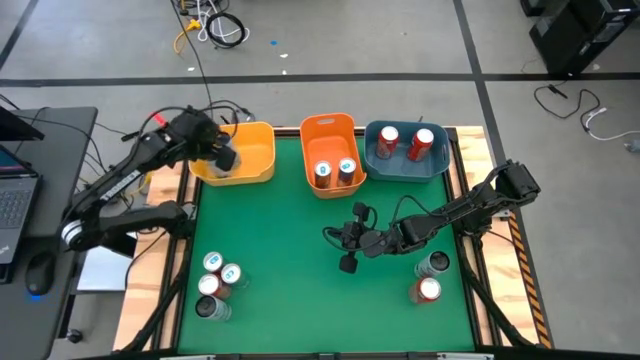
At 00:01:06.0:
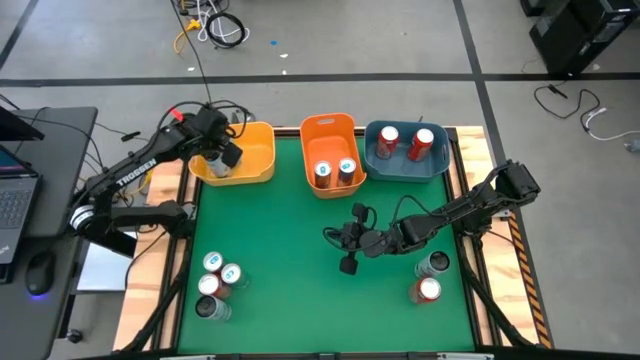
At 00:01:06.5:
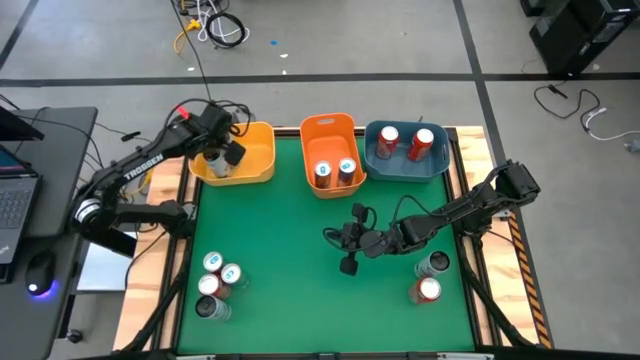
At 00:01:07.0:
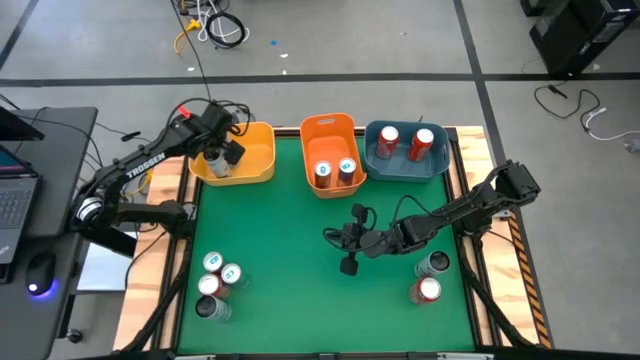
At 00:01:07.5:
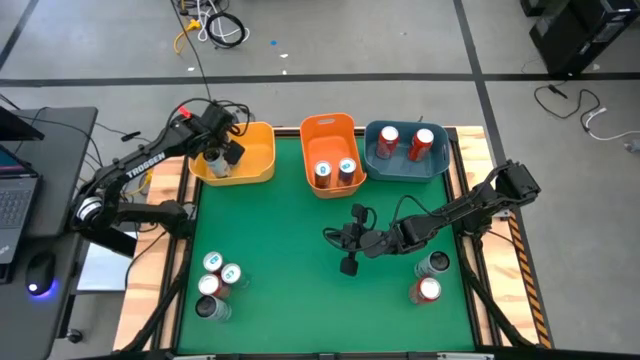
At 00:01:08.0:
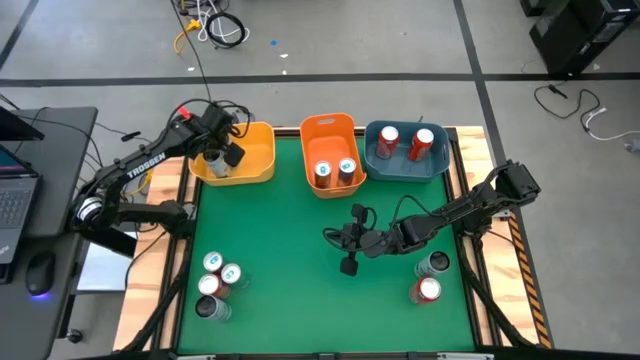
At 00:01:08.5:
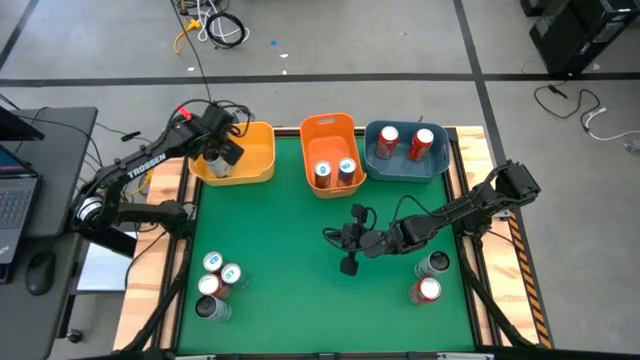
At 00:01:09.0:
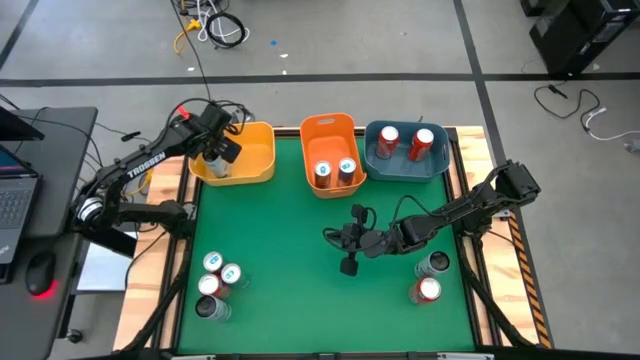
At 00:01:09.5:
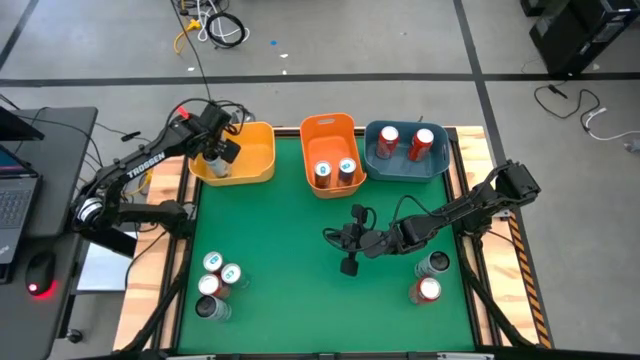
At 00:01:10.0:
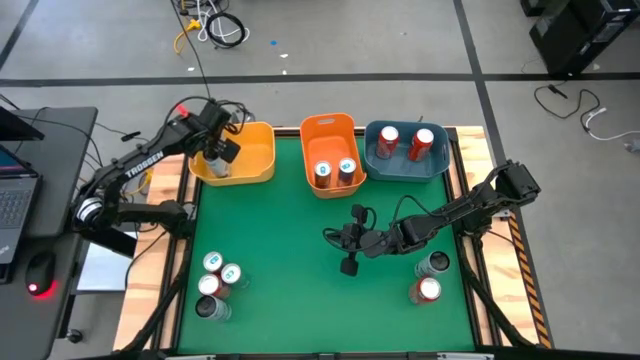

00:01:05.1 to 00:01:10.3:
Task: Sort soda cans
Adjust the white blue soda can in the yellow bin

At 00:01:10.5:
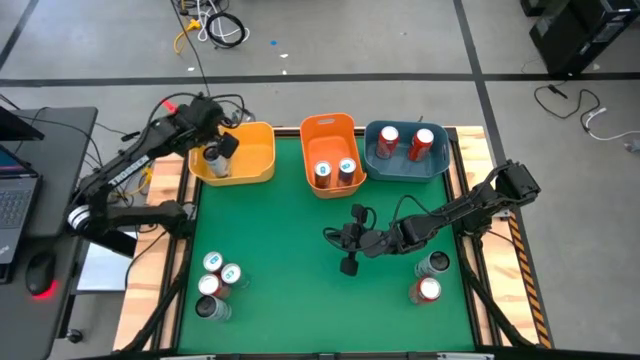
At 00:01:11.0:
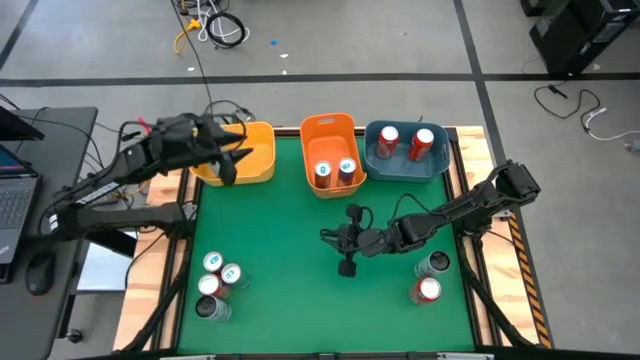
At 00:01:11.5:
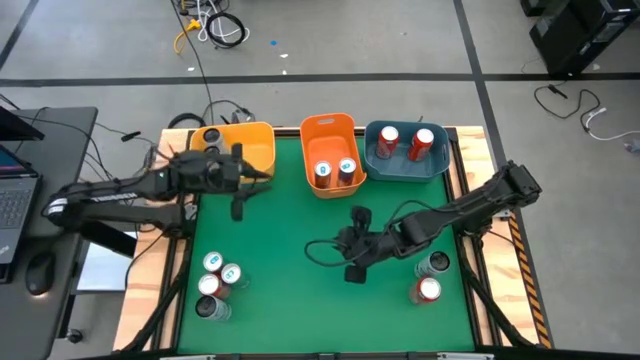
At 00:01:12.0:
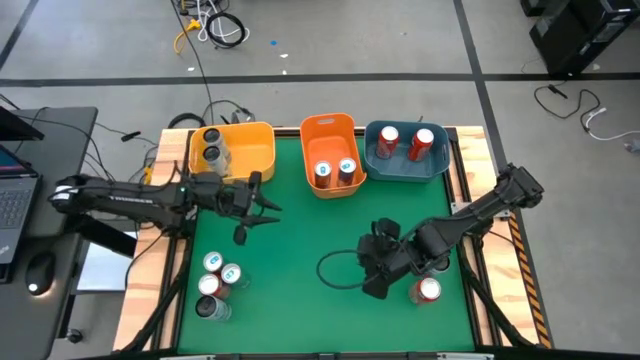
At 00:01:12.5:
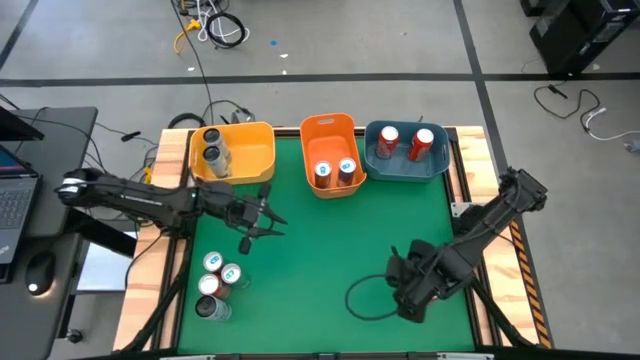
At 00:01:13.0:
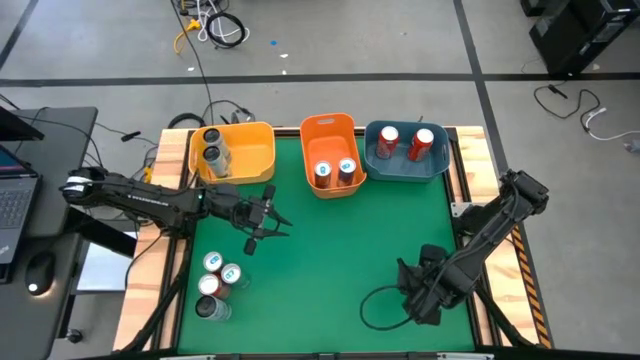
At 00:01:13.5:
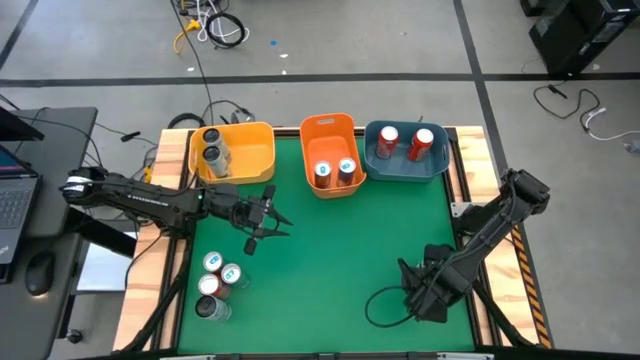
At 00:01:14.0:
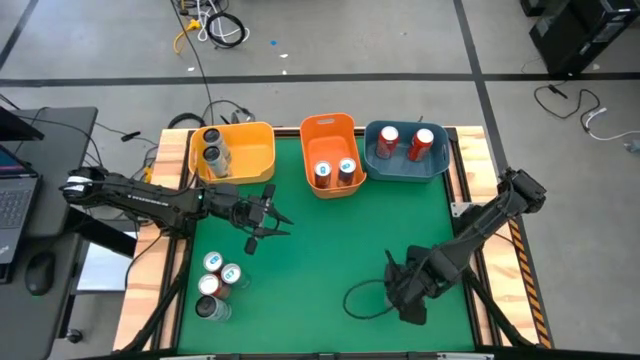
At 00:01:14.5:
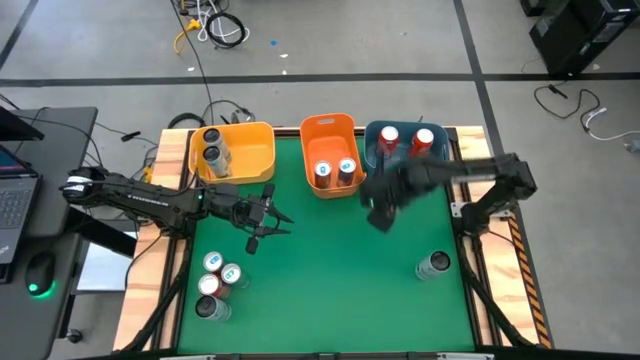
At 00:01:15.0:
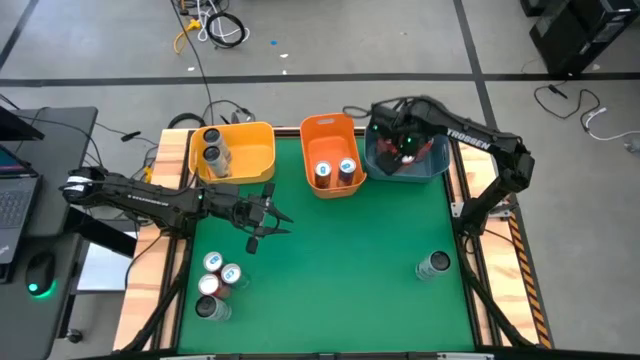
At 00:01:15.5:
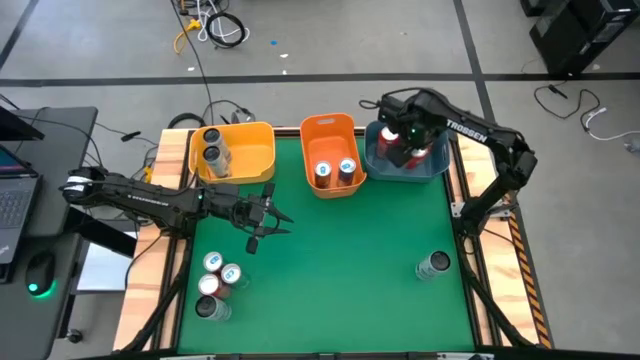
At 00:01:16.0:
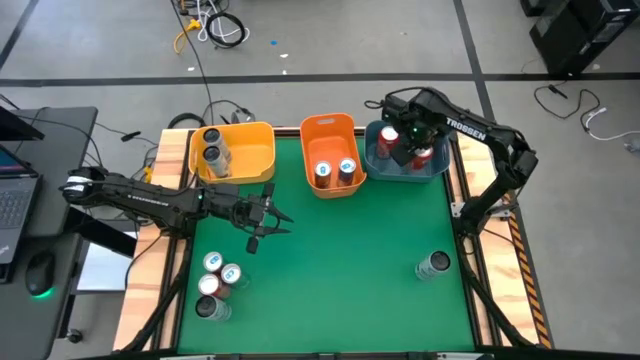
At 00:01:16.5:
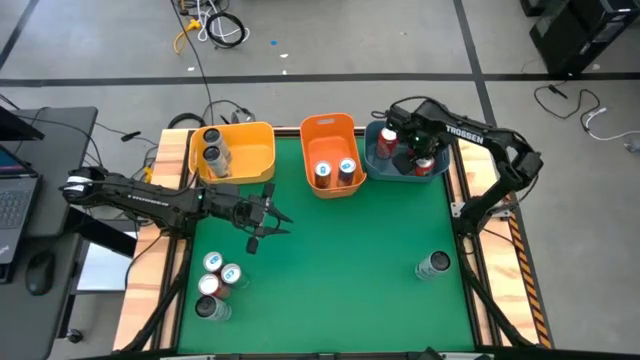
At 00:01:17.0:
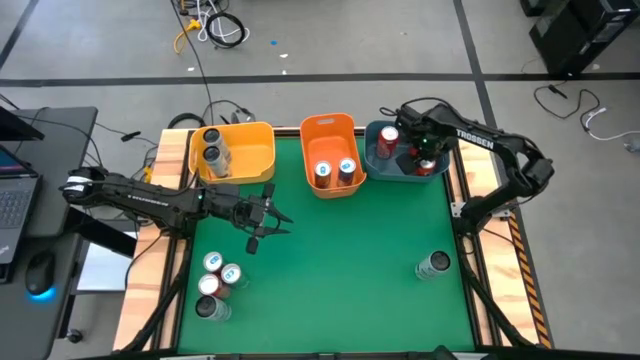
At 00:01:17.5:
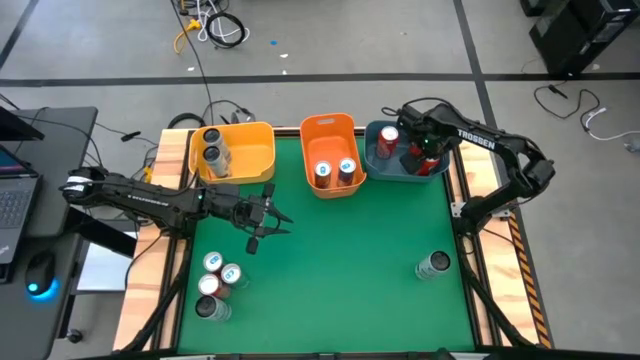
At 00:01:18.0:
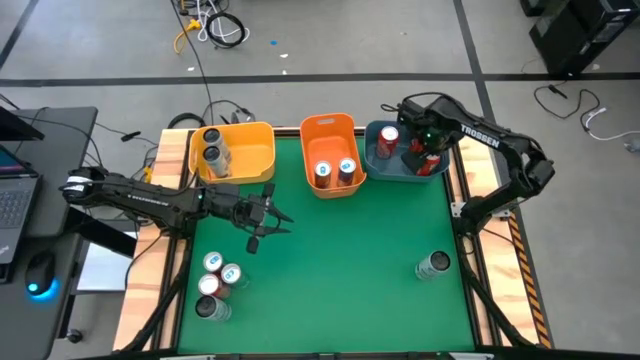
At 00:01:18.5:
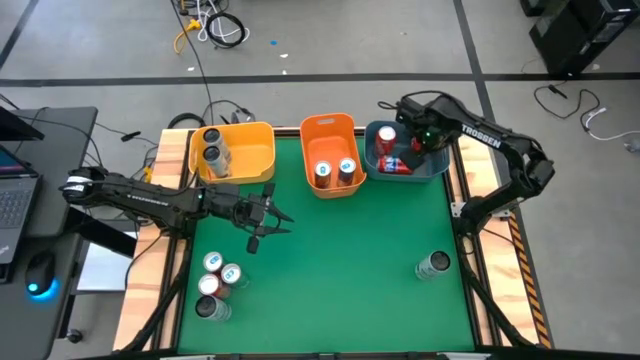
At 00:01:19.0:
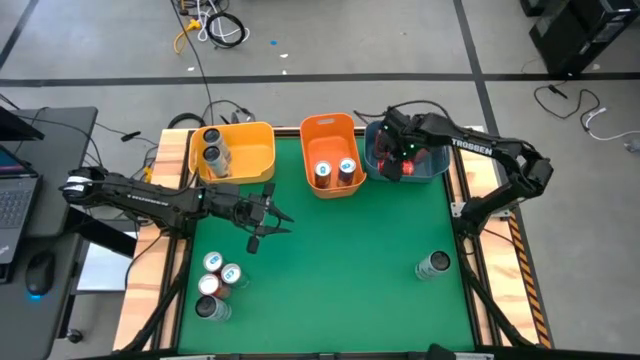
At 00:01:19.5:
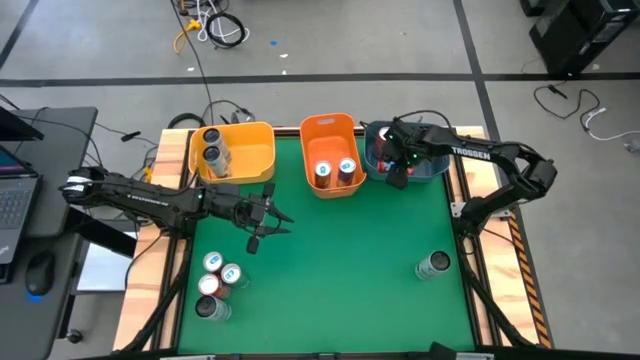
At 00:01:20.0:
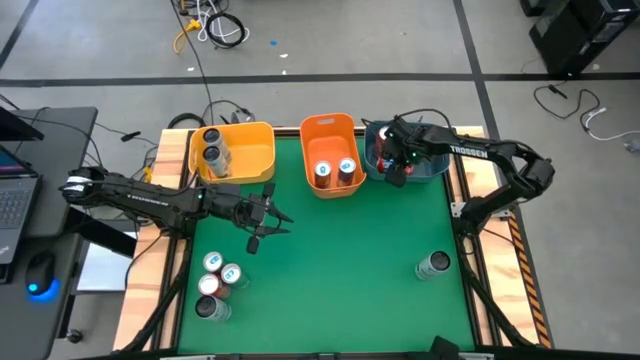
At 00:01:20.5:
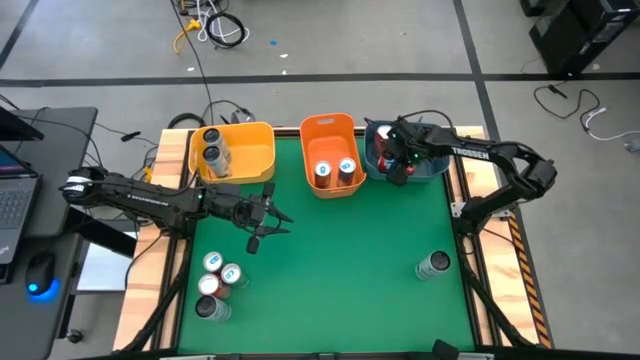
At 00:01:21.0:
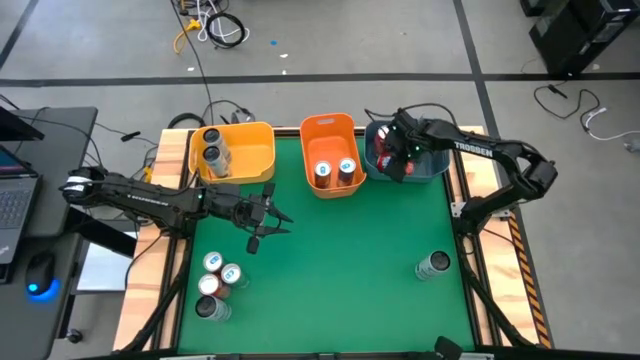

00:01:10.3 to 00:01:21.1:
Put the orange soda can into the blue bin

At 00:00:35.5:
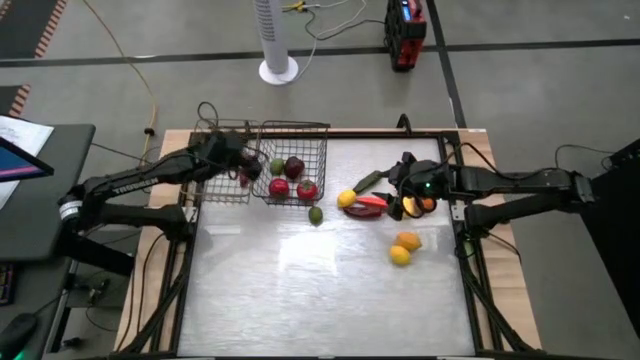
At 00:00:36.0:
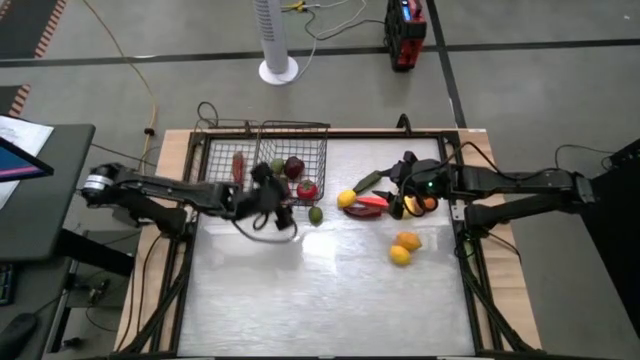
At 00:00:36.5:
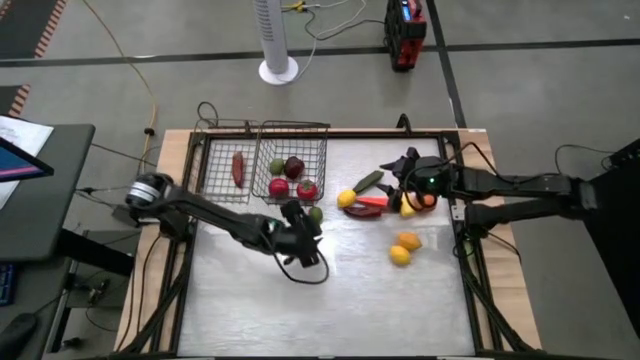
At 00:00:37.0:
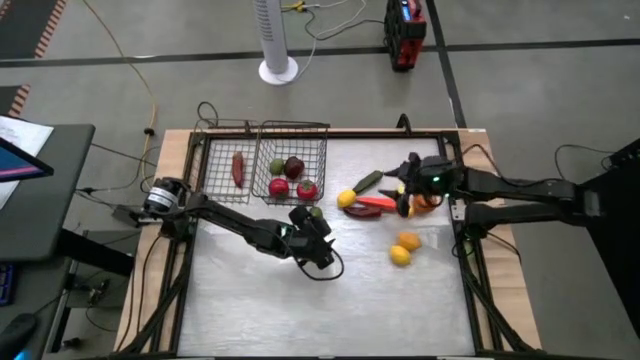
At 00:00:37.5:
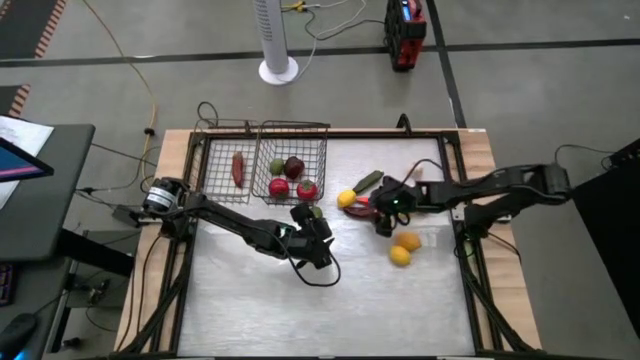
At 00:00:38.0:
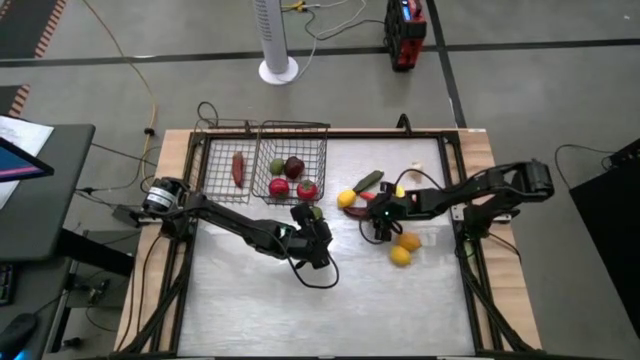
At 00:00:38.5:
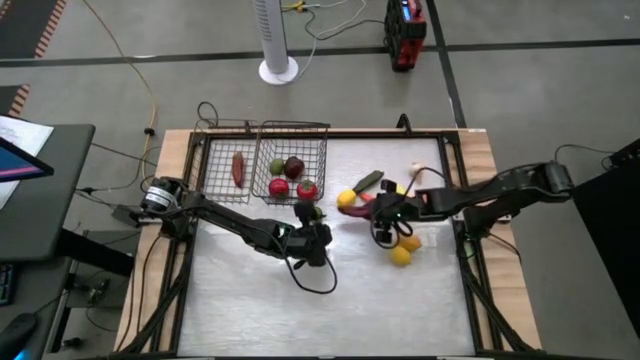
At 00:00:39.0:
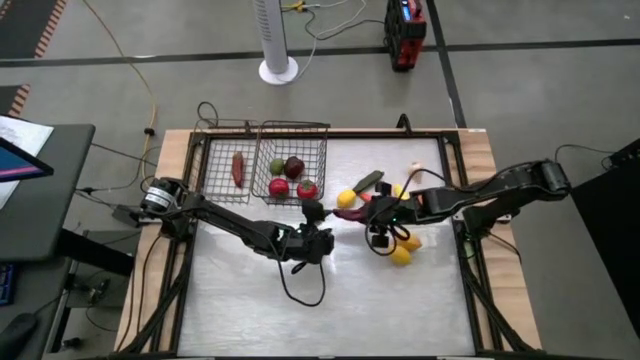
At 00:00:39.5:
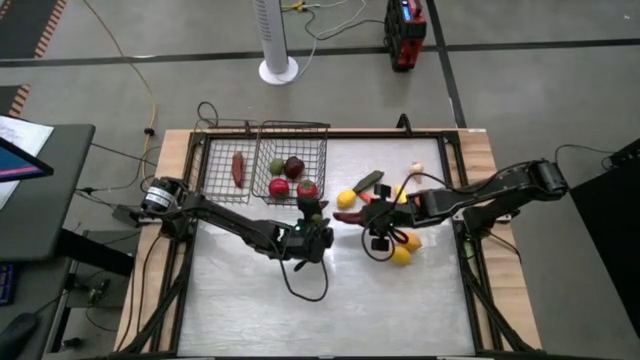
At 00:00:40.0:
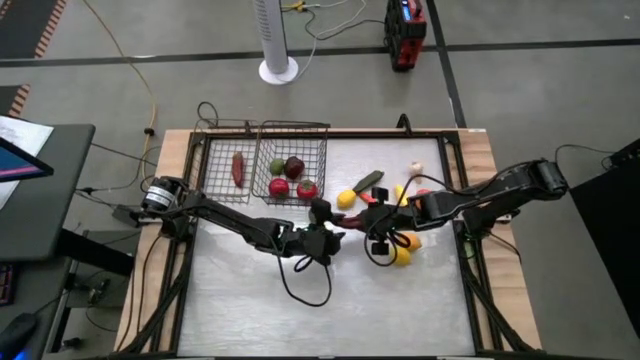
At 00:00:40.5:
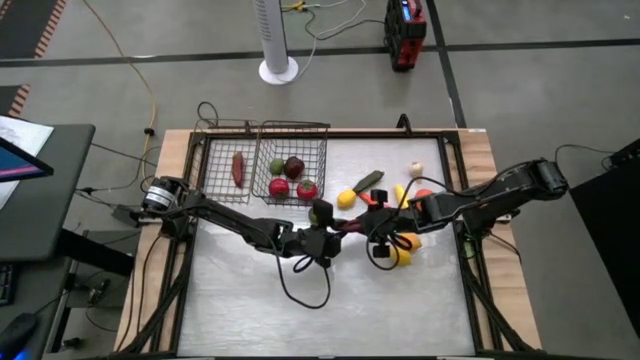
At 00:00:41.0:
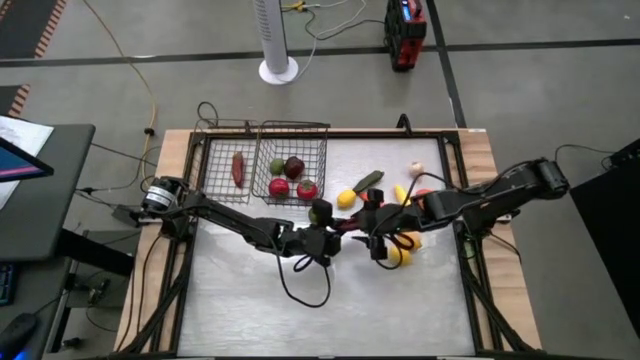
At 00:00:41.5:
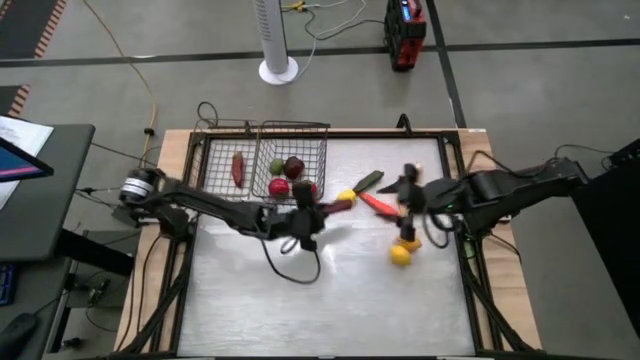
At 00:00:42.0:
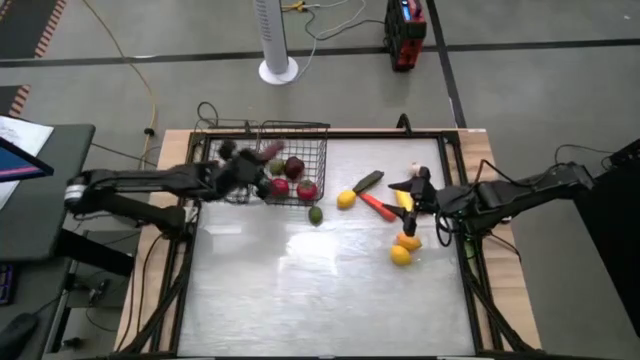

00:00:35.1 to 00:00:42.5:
Task: Sort produce into baskets
Put the purple chili pepper into the left wire basket
